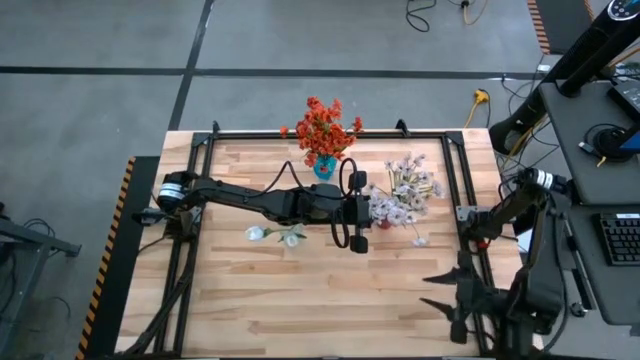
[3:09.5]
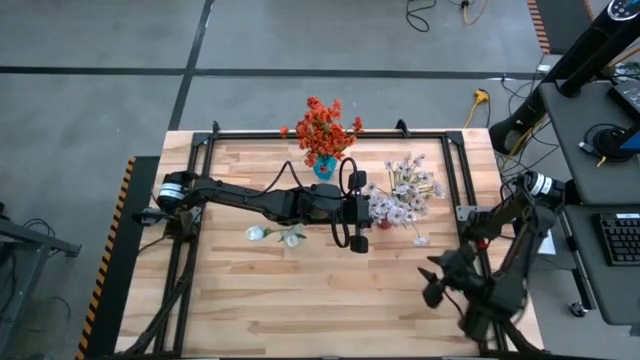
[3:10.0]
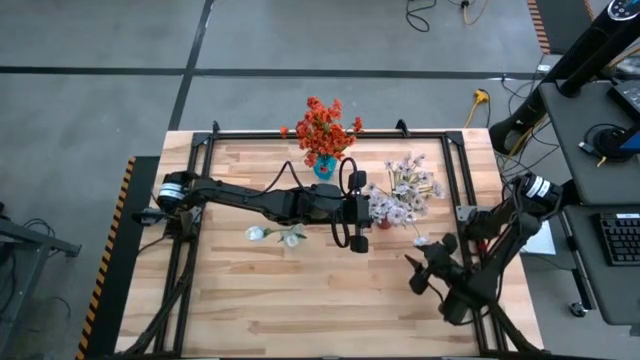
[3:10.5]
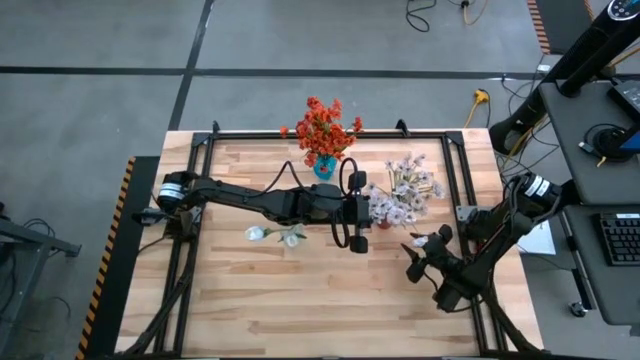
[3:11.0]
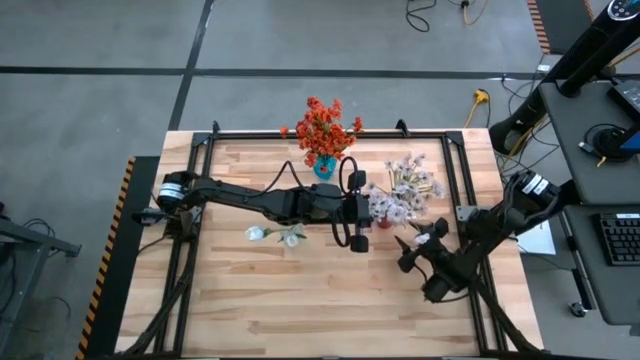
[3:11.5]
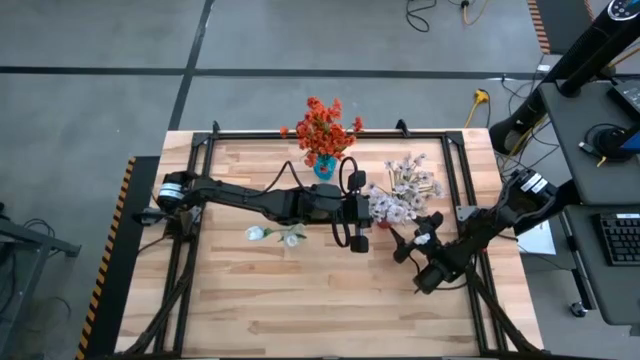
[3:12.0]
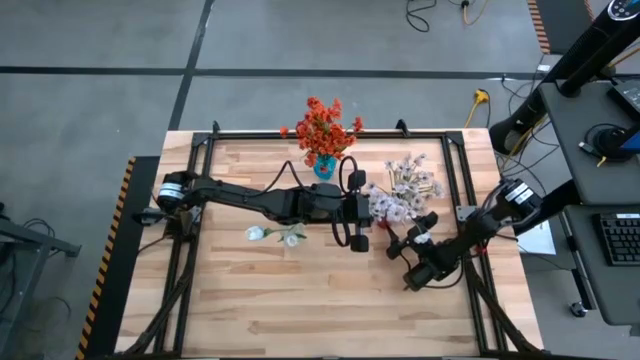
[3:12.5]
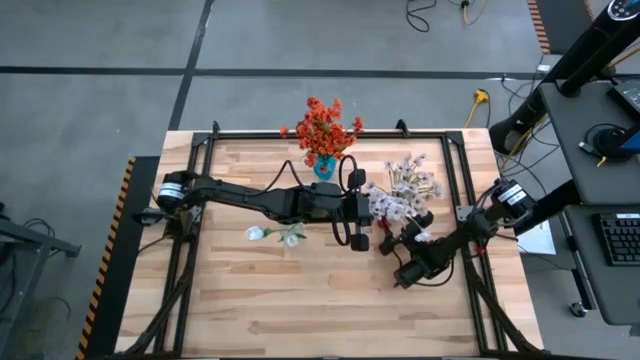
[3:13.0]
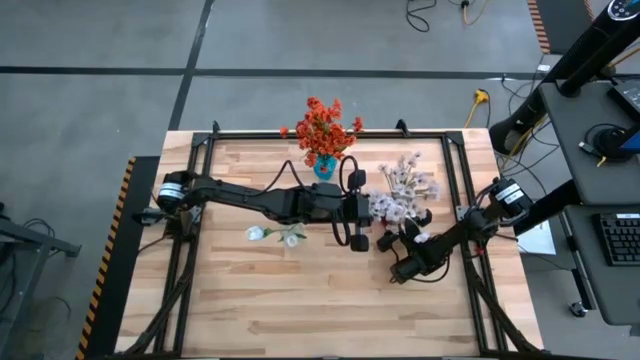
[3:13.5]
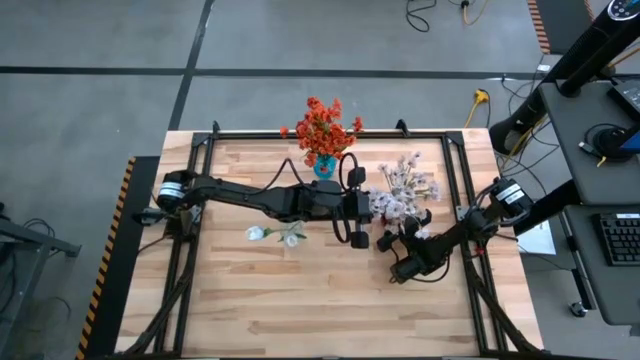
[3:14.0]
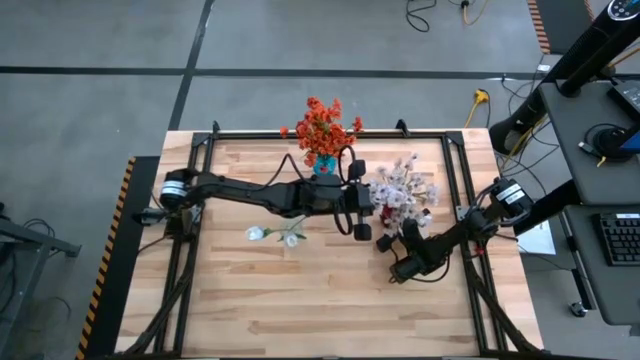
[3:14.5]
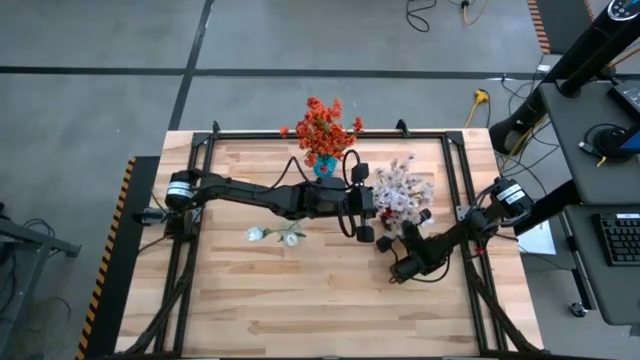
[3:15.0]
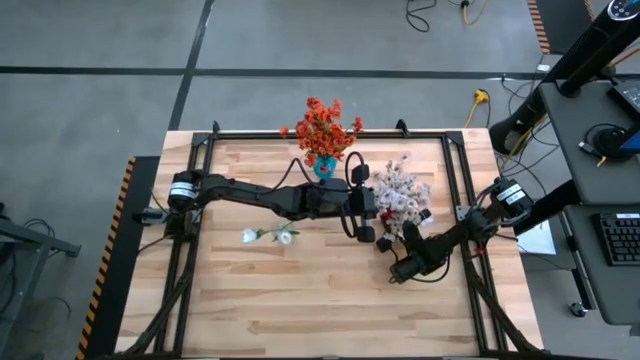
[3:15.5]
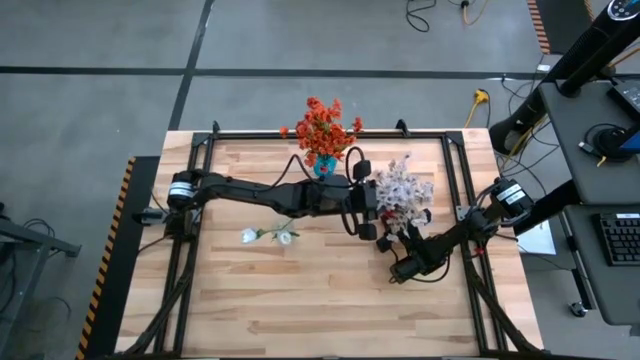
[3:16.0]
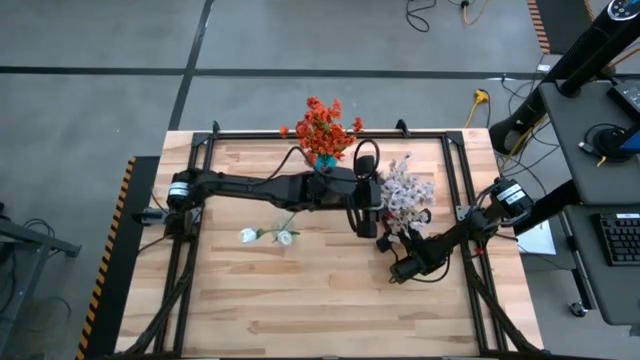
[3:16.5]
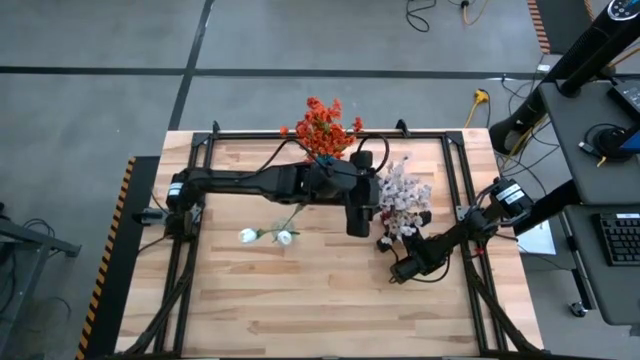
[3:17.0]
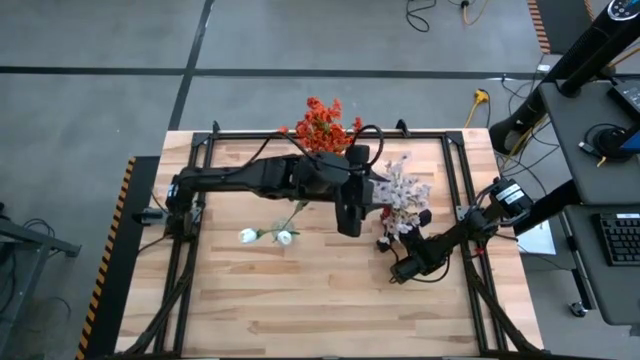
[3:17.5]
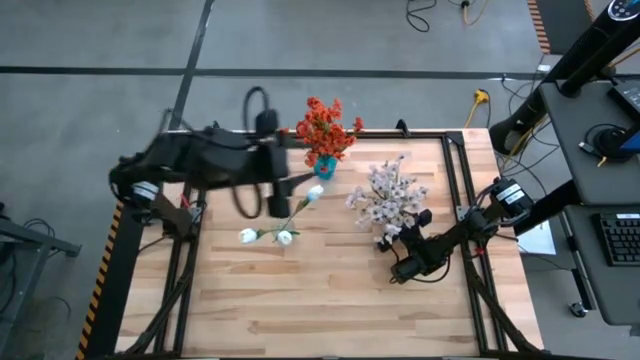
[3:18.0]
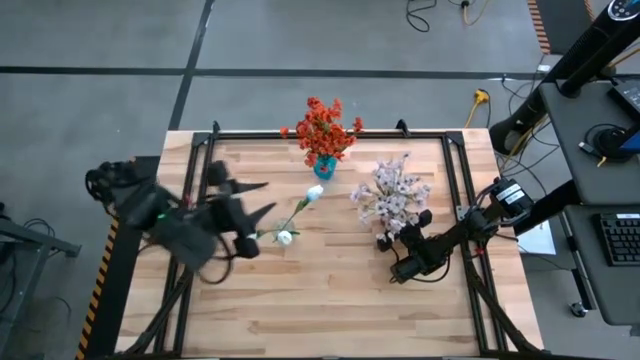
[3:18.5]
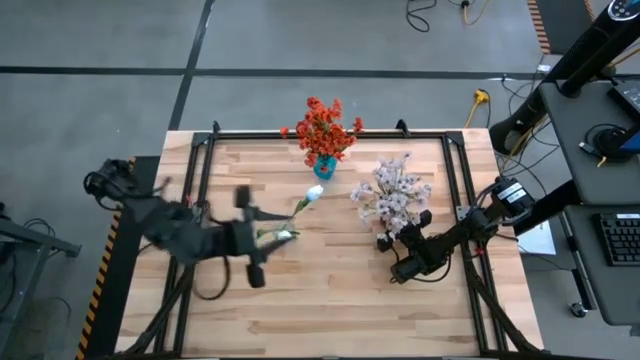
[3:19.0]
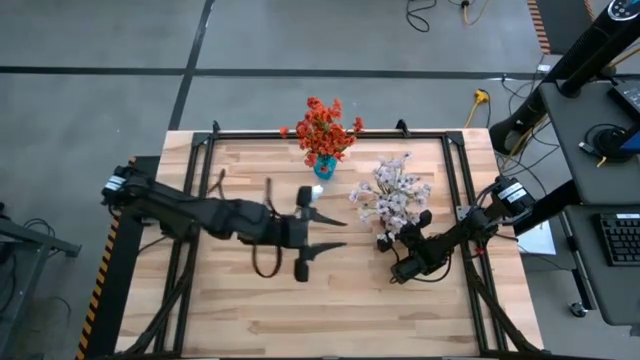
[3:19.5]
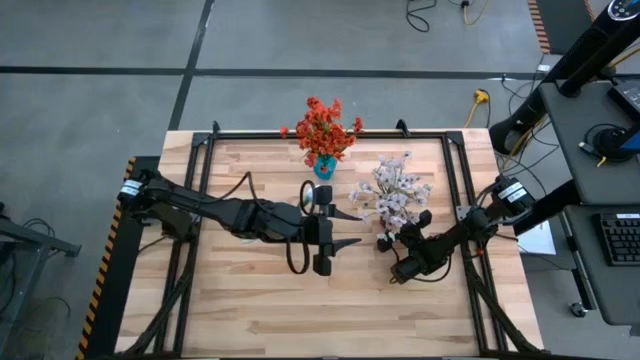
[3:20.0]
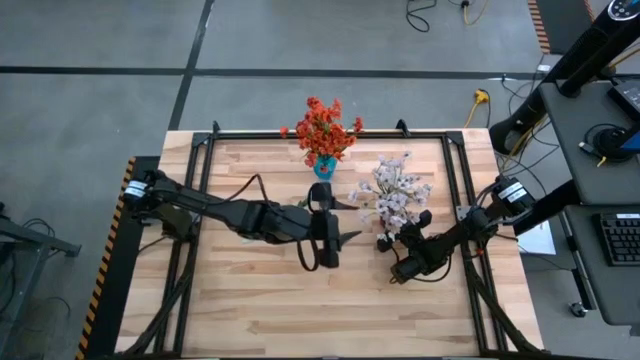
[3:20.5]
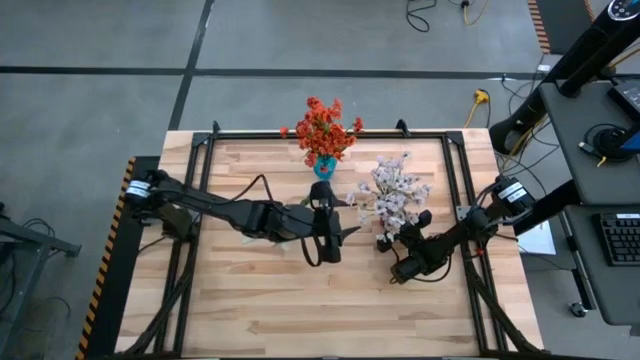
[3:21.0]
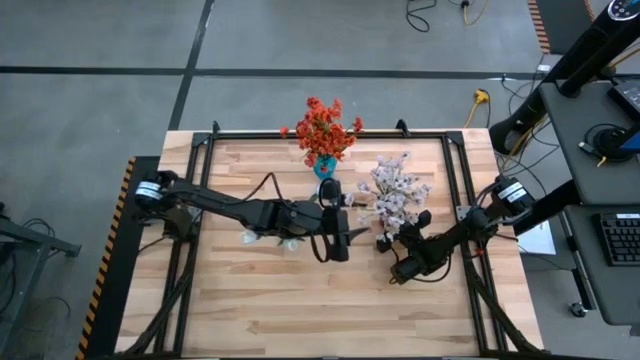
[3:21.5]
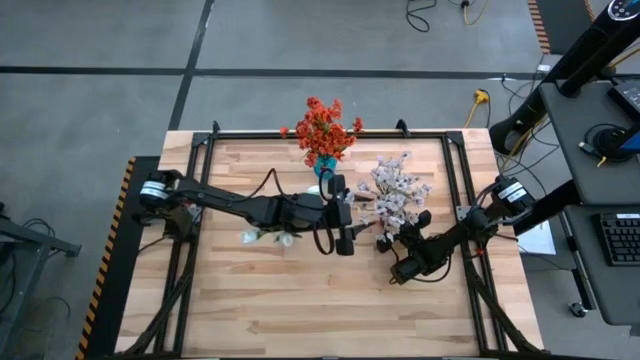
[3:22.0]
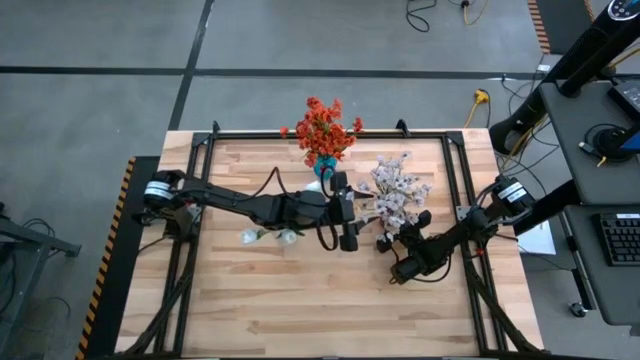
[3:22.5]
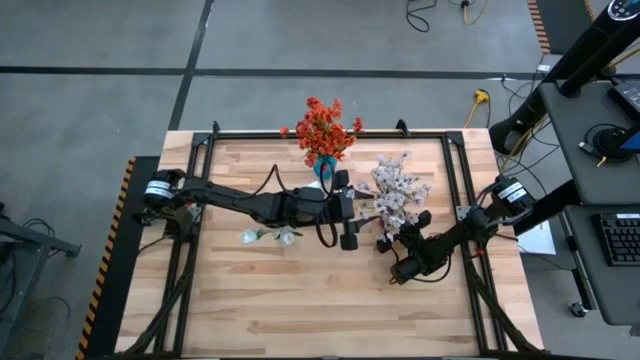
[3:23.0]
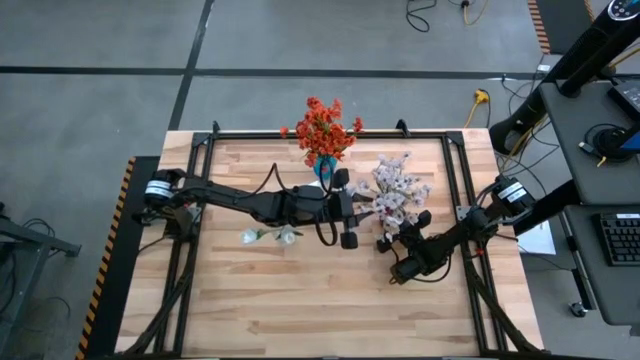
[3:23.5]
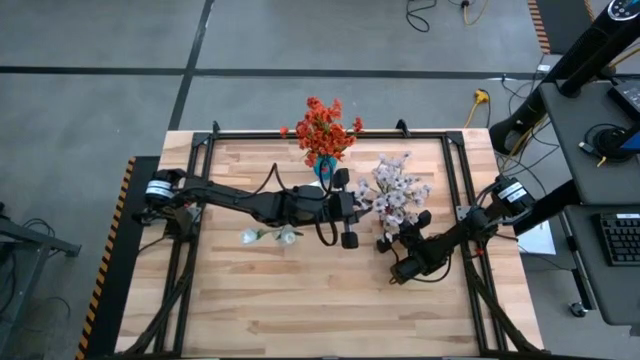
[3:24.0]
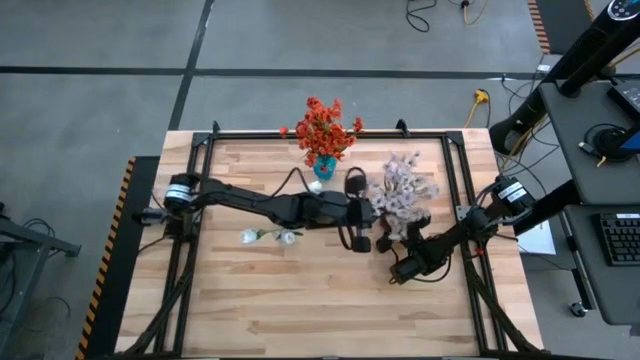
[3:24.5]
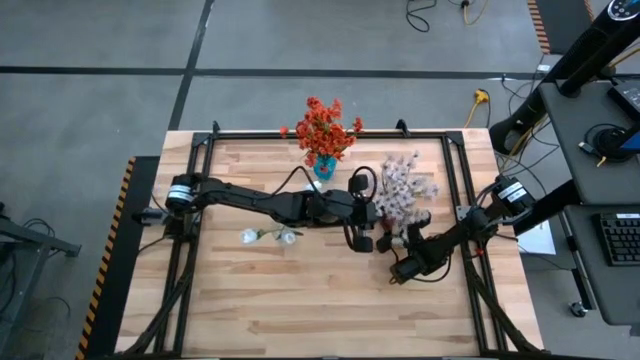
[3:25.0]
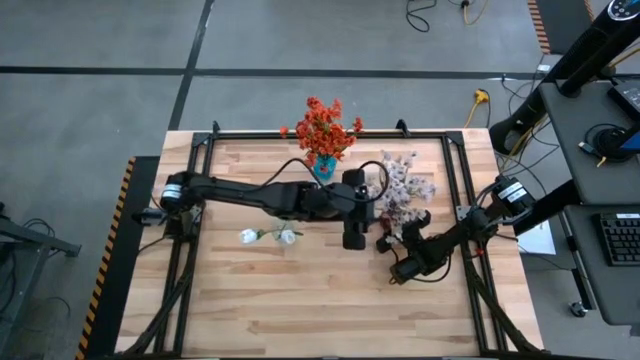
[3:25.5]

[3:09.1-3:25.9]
Task: Sort flowers into vase by color
Put the white flowers into the red vase

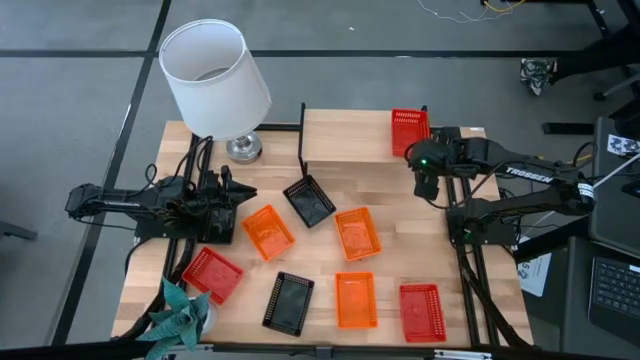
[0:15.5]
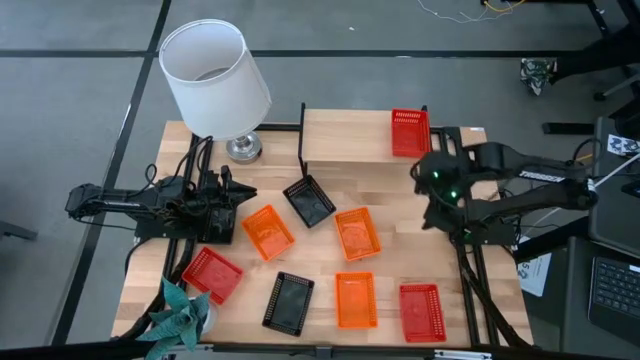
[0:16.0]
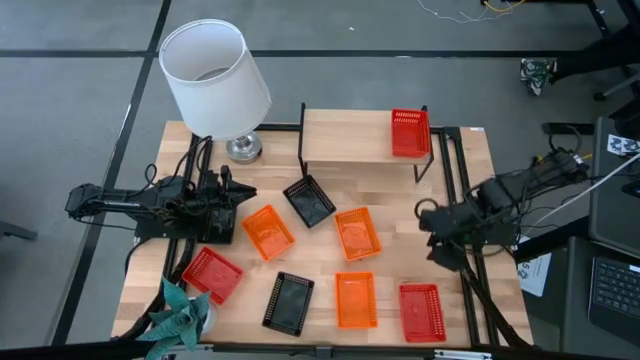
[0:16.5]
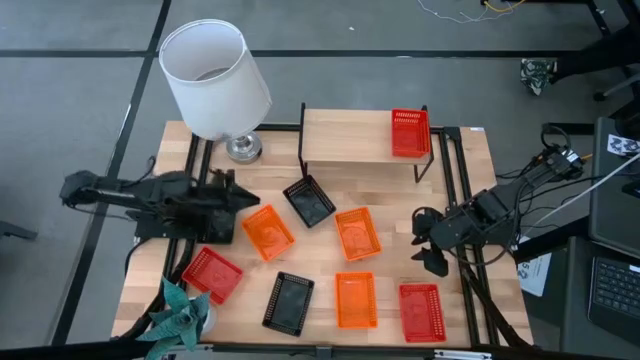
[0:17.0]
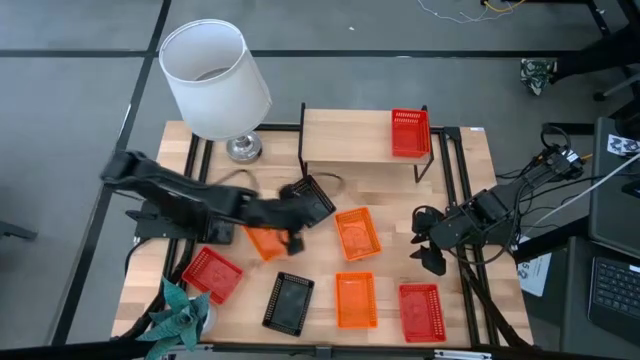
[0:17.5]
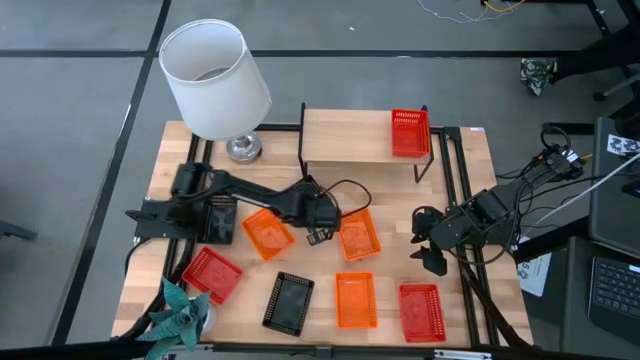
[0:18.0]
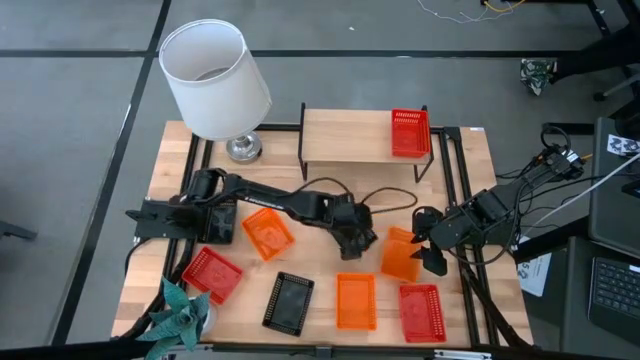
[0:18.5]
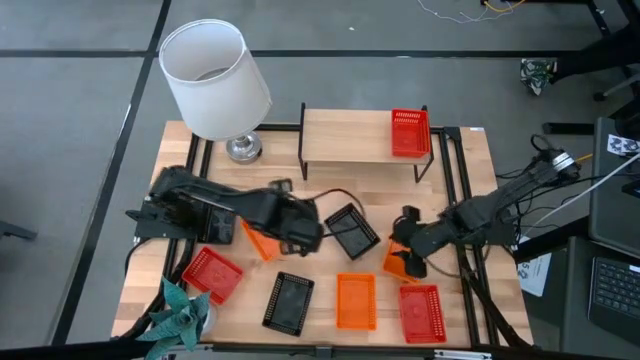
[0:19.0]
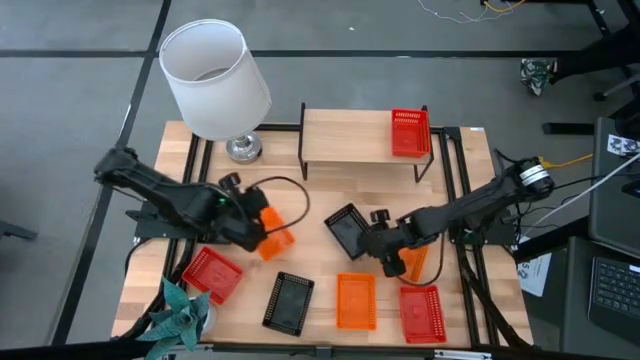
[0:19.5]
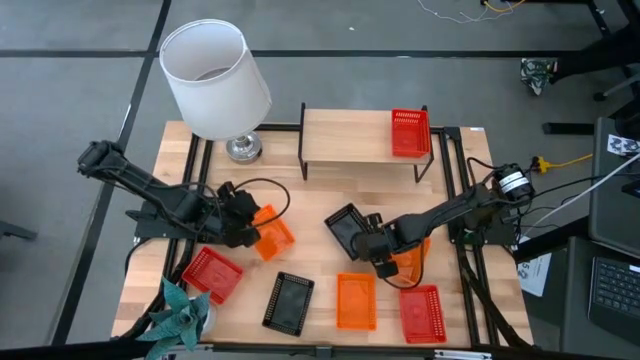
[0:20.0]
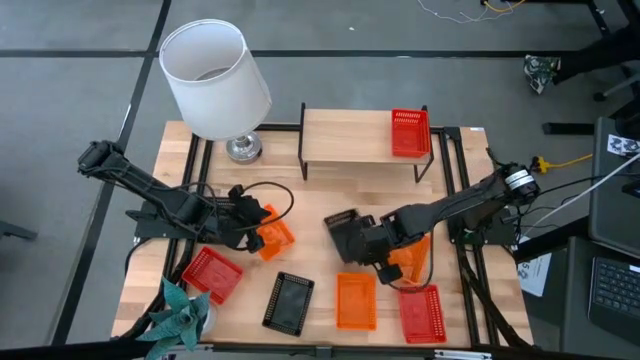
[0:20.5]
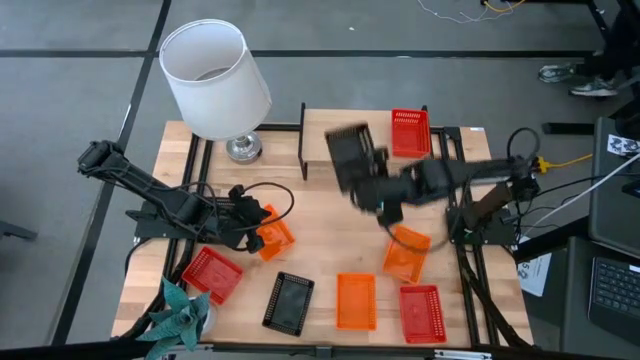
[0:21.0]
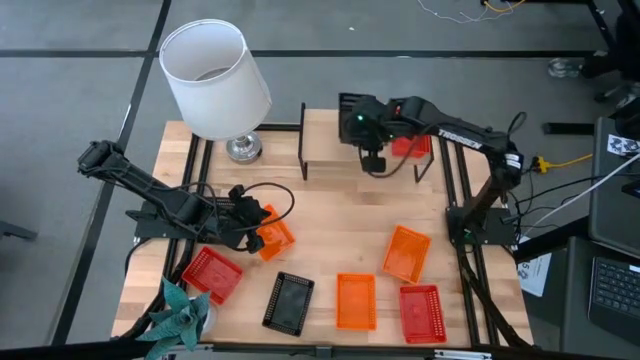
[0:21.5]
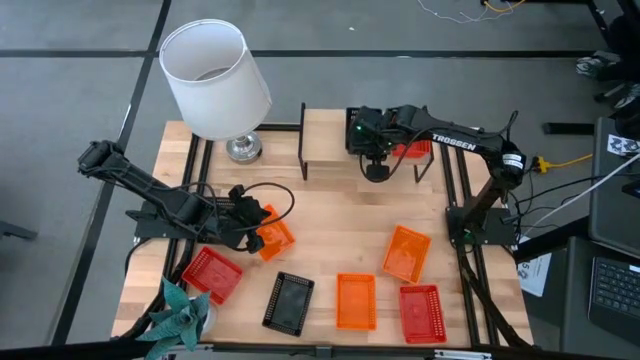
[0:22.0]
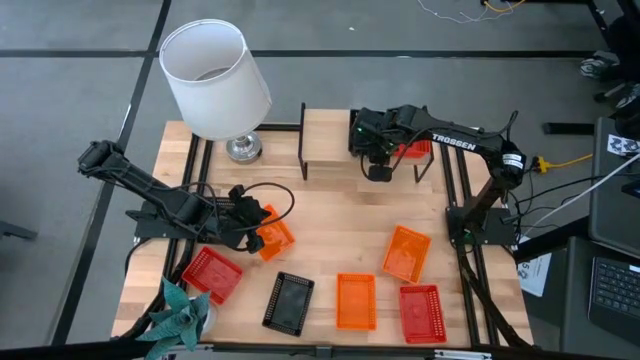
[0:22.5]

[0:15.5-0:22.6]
Task: Stack baskets on shelf by color
Put the top right black bin on the shelf
